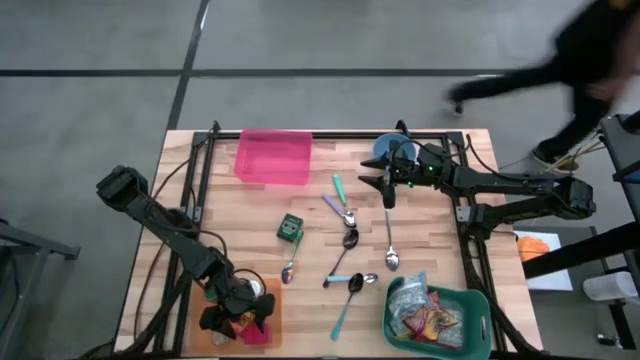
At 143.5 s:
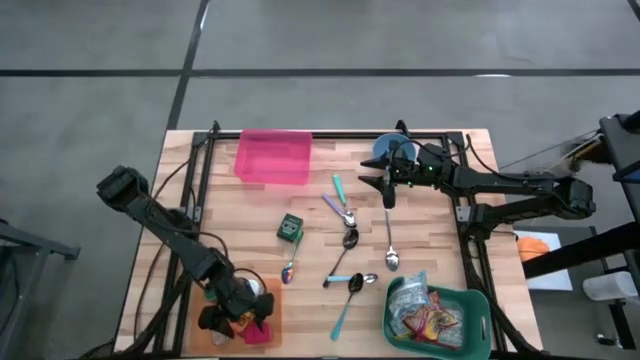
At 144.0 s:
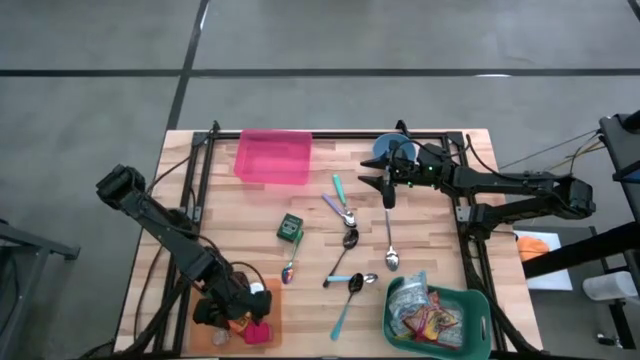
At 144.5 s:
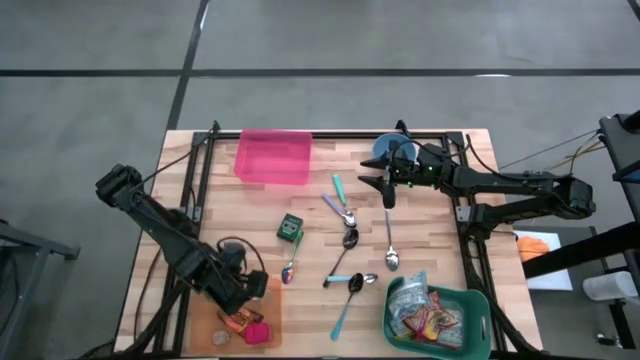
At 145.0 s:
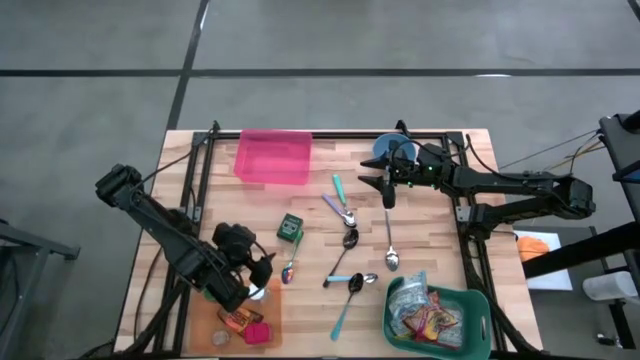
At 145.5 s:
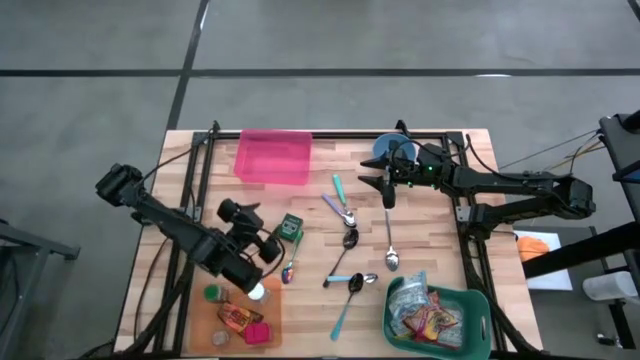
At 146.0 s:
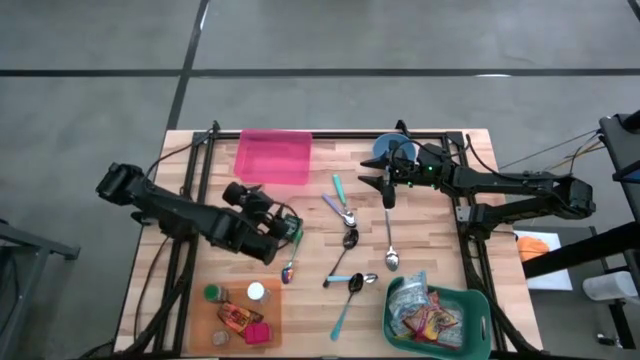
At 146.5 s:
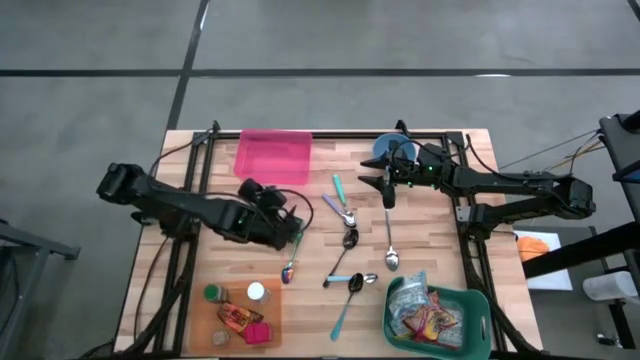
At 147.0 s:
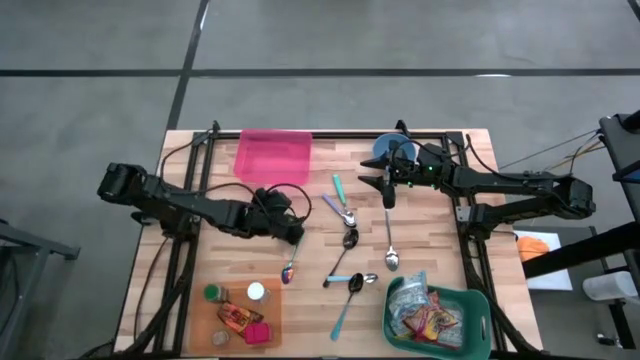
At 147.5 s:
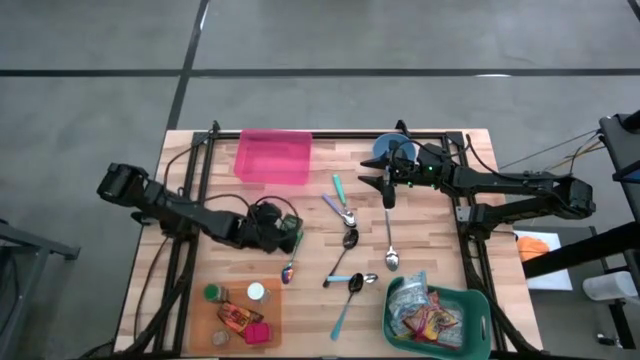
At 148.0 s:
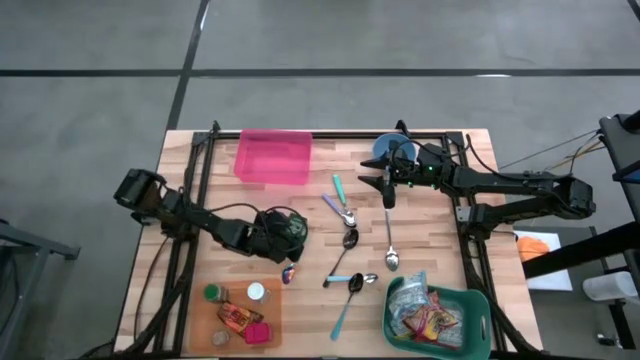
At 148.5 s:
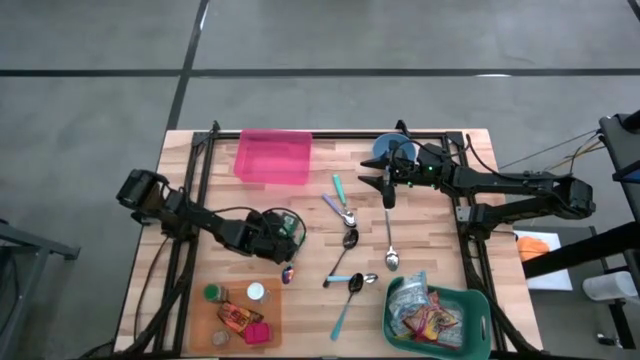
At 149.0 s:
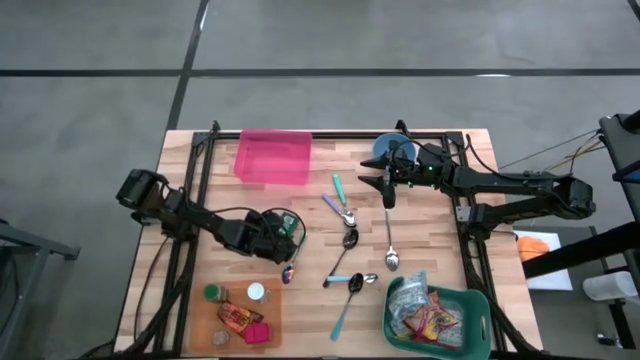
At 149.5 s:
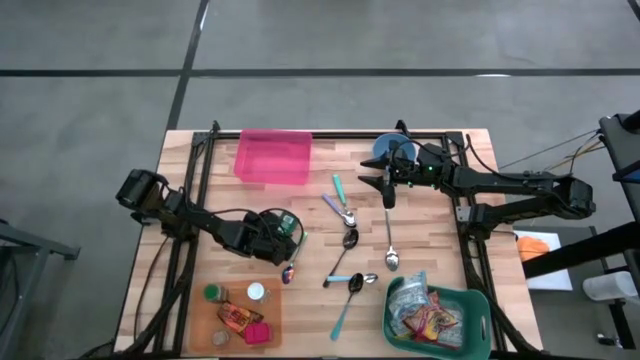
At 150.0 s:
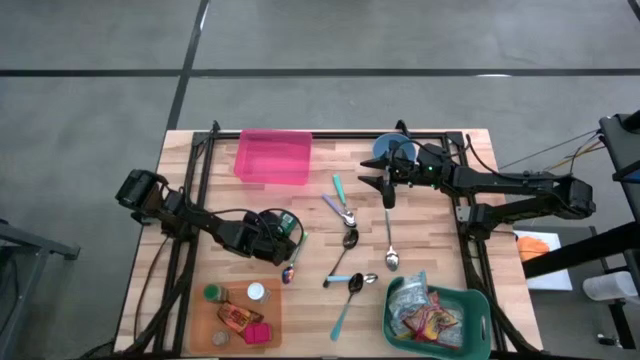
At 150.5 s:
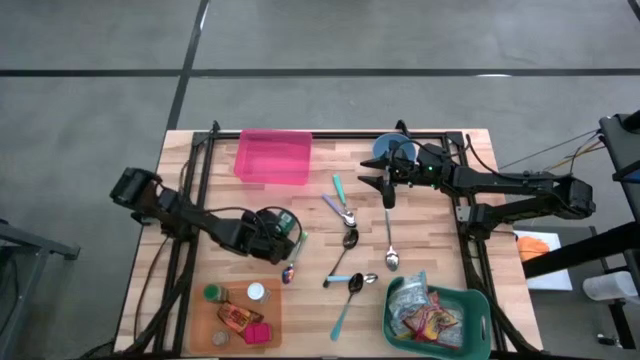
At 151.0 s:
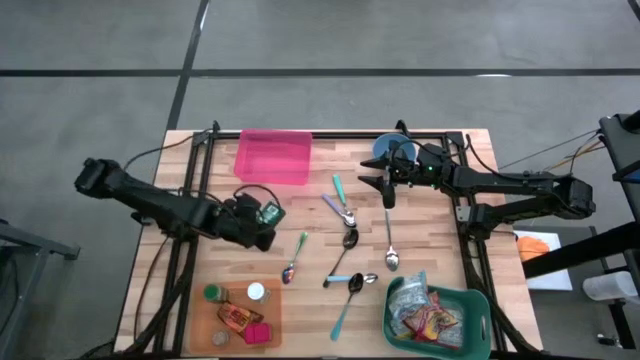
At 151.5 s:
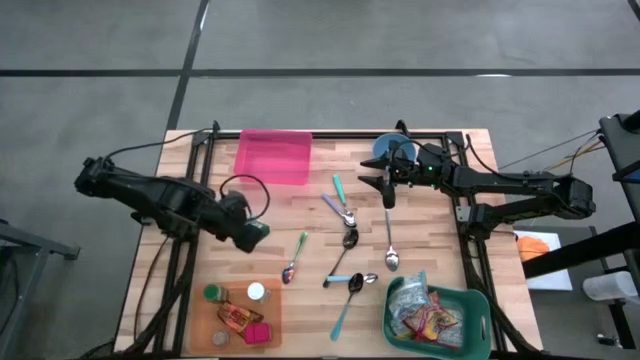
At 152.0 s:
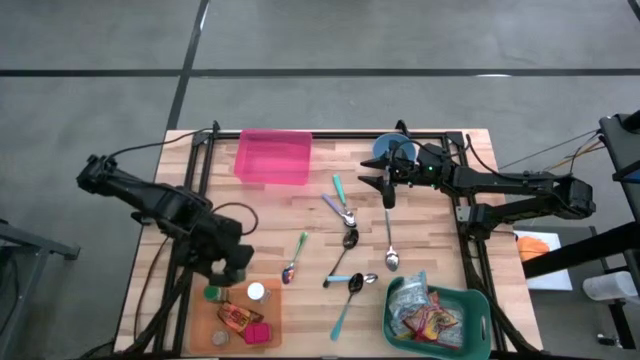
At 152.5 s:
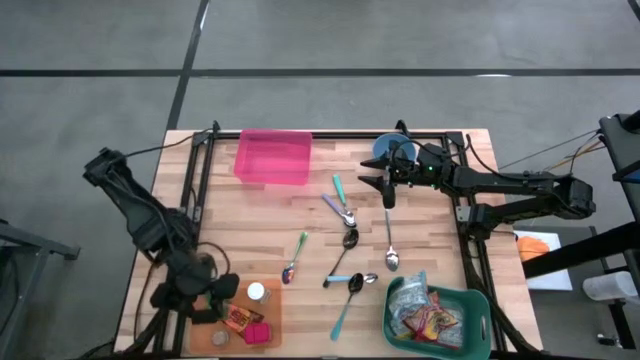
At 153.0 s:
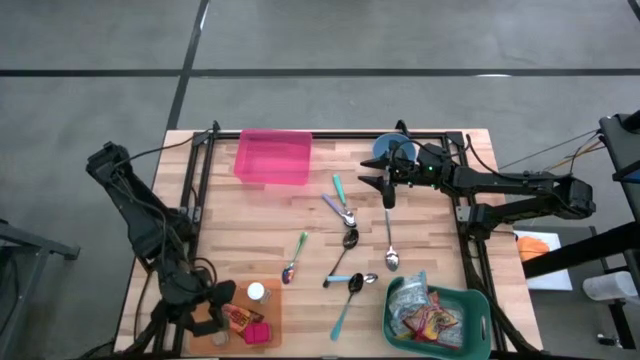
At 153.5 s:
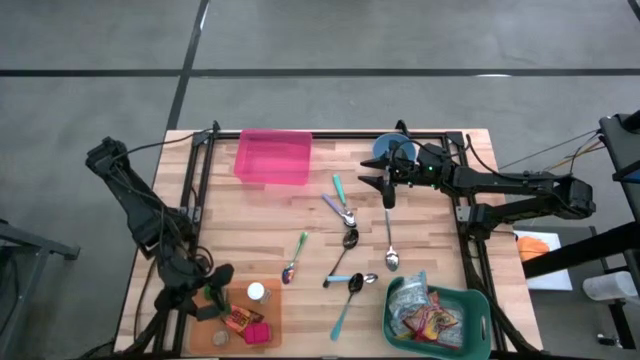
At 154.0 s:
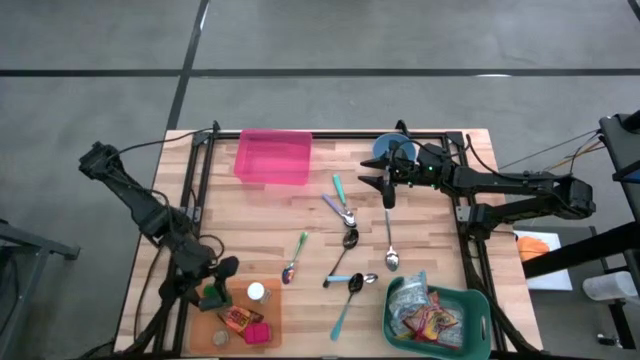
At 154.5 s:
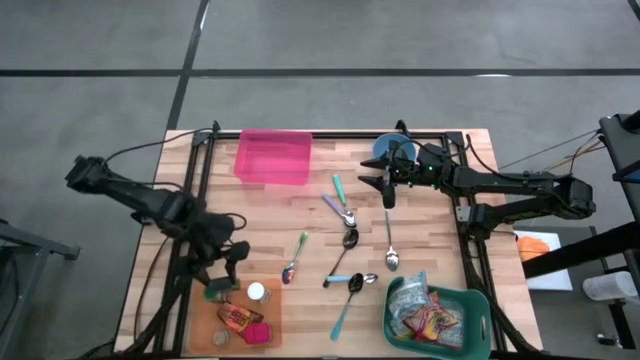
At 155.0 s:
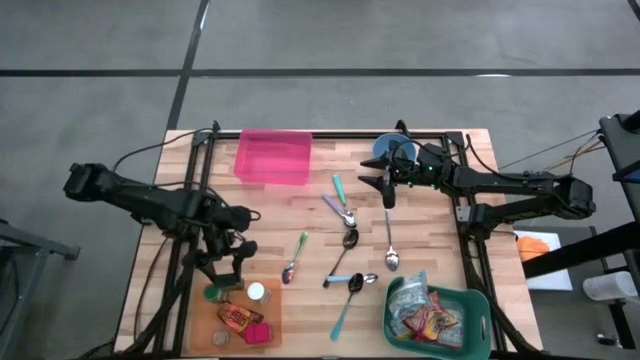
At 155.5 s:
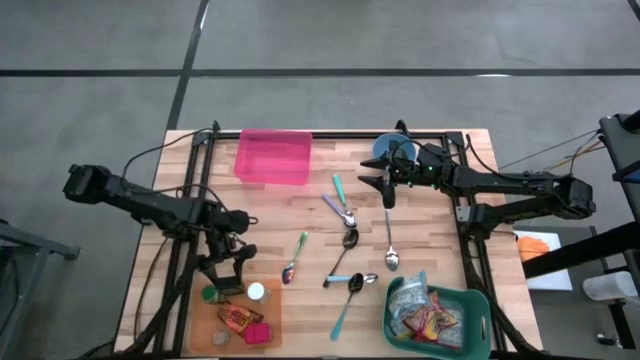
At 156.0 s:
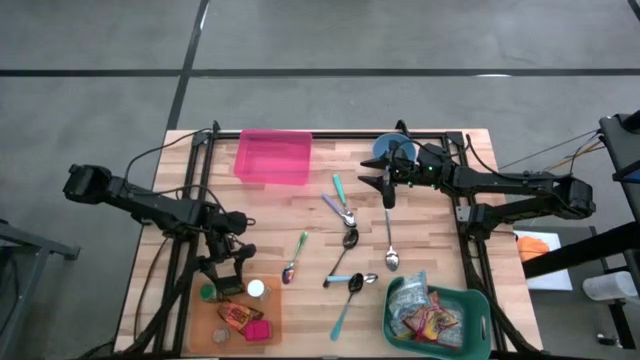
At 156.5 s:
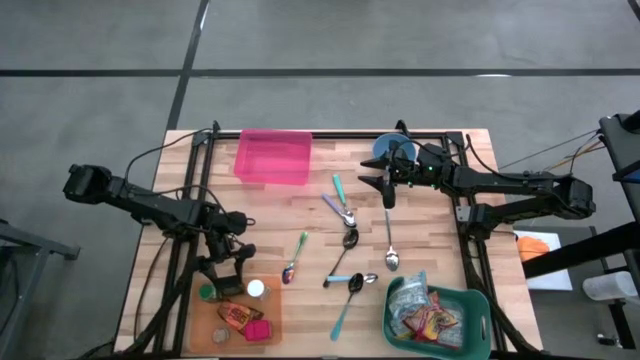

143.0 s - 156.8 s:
Put the green seasoning can into the orange bin

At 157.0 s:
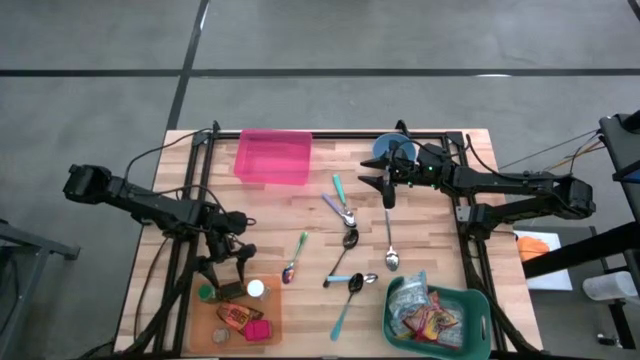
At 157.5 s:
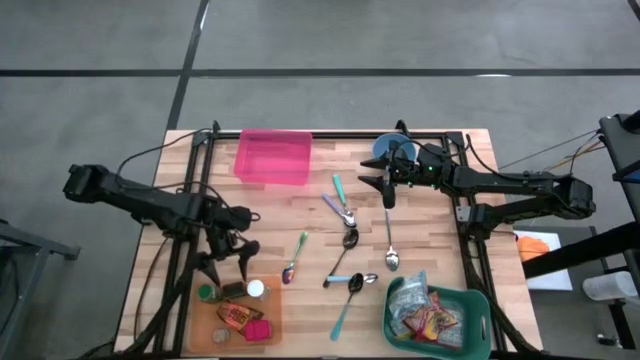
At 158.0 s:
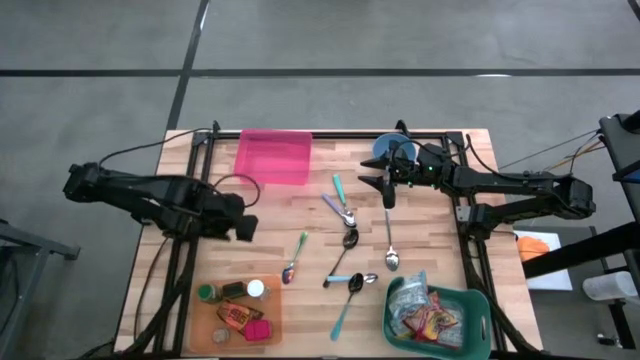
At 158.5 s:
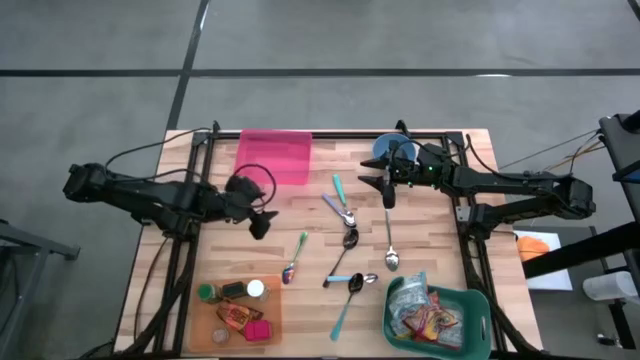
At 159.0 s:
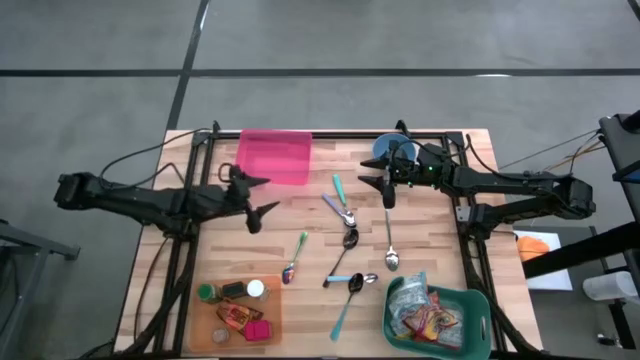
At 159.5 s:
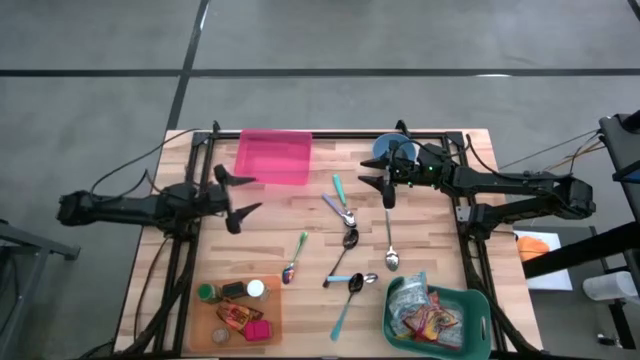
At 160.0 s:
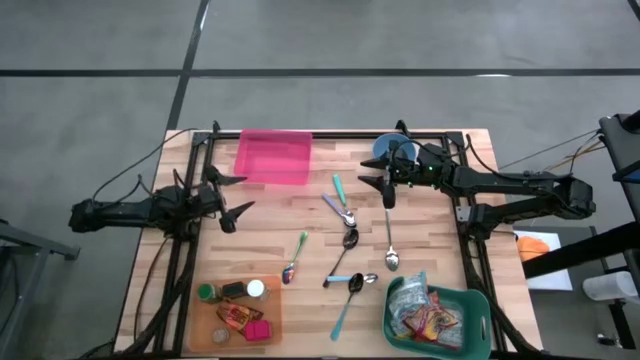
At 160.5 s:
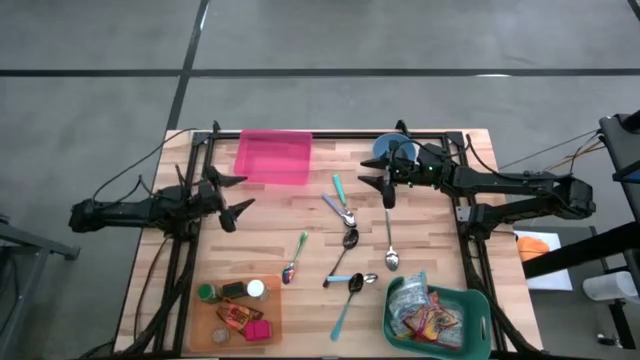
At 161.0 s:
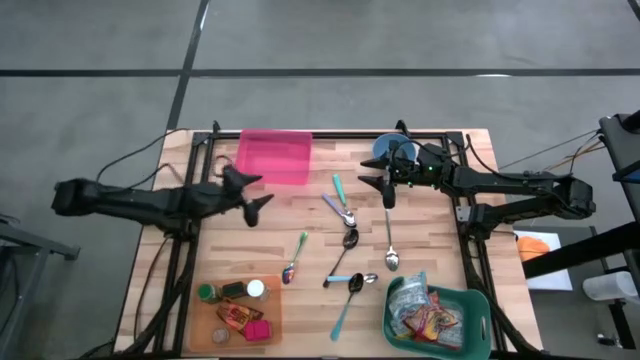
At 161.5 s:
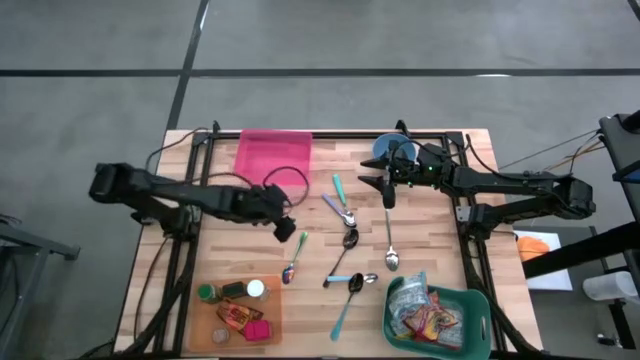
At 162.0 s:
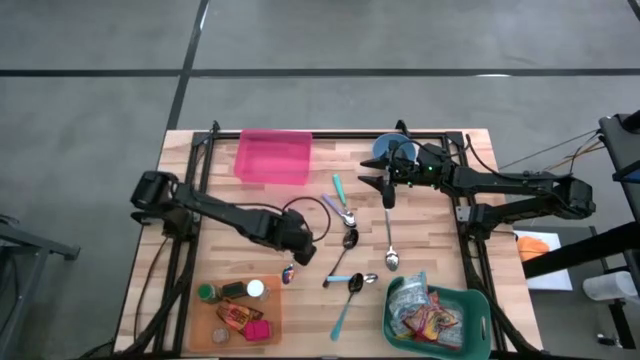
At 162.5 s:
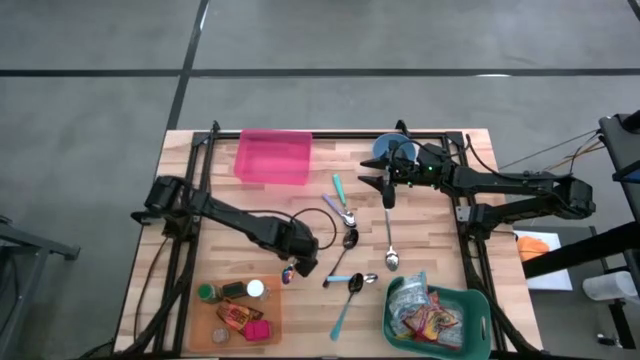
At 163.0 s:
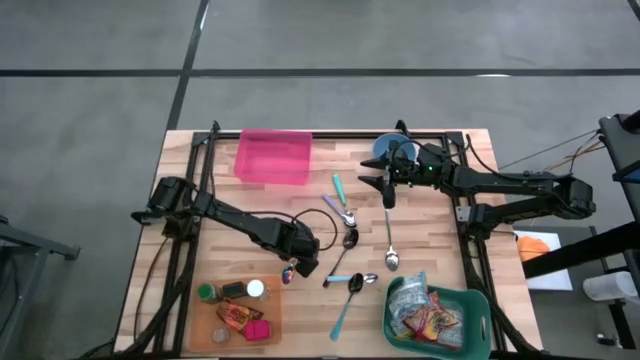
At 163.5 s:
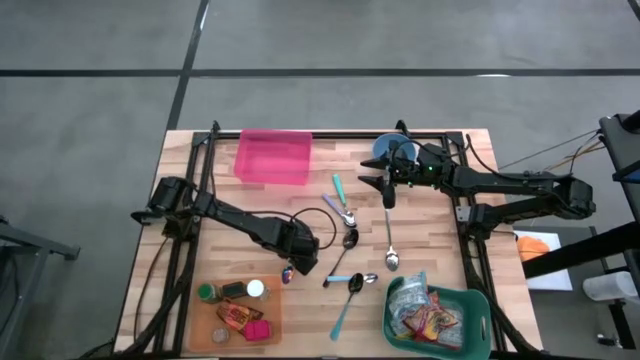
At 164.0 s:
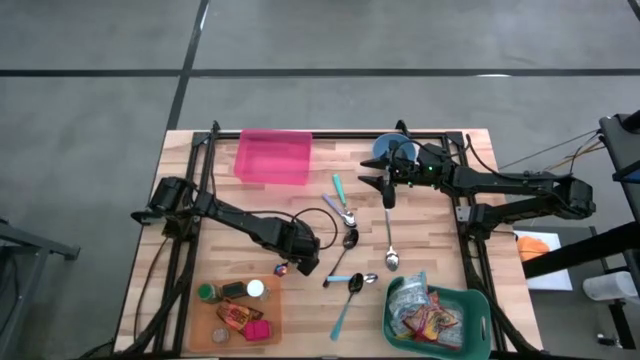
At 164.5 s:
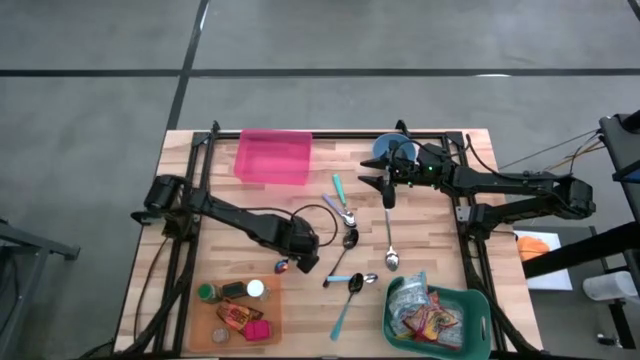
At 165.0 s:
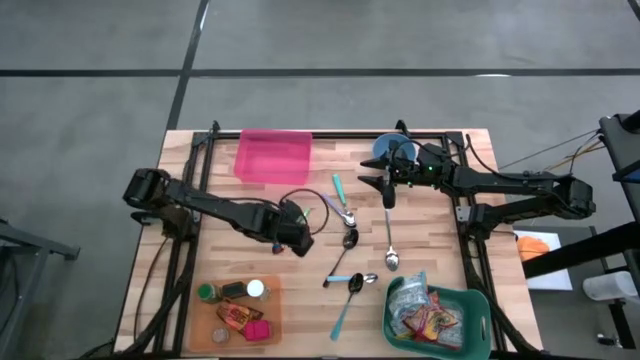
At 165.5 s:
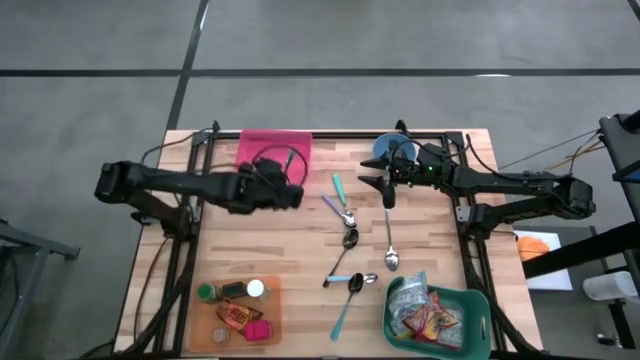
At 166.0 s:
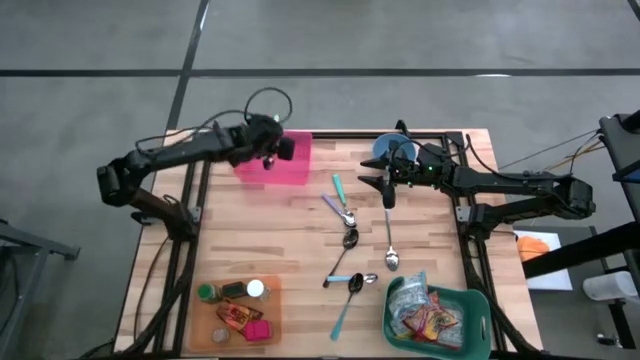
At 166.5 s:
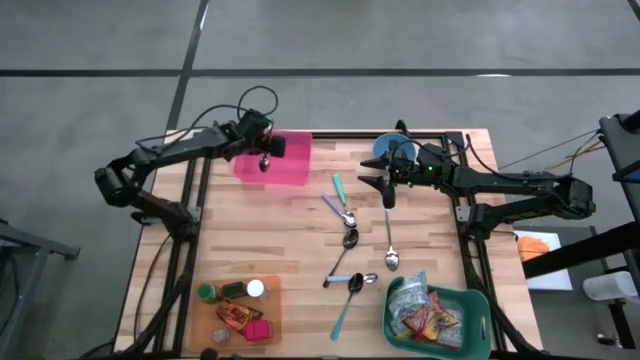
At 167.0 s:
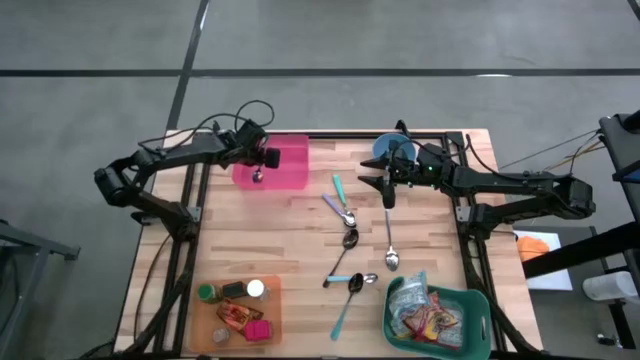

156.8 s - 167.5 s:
Put the purple spoon into the pink bin
